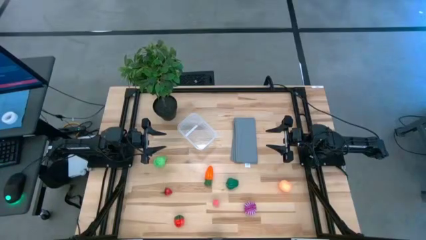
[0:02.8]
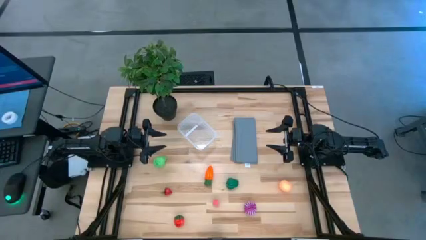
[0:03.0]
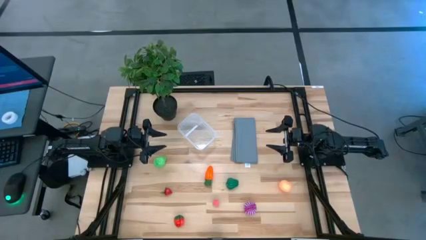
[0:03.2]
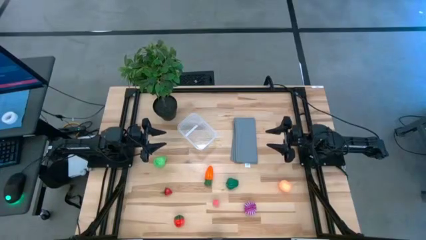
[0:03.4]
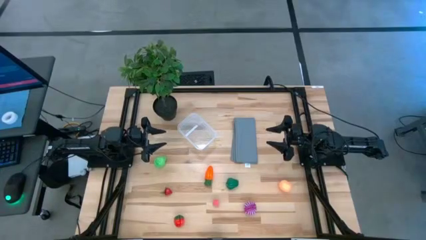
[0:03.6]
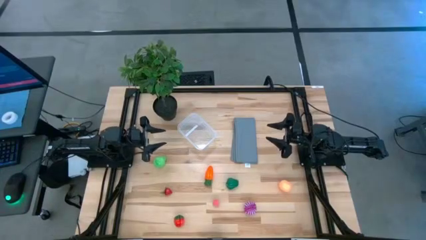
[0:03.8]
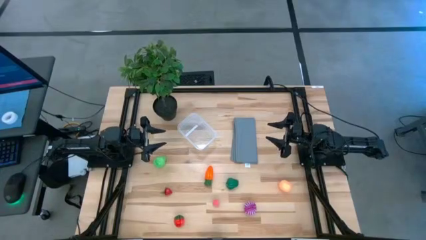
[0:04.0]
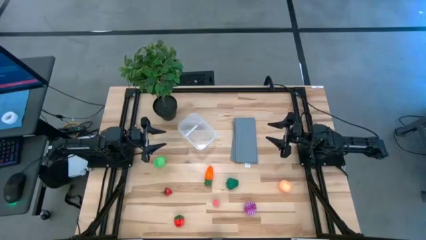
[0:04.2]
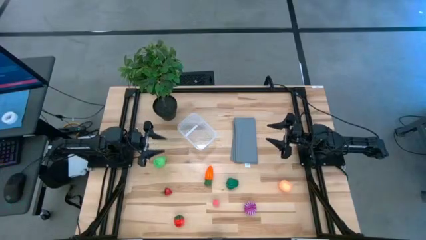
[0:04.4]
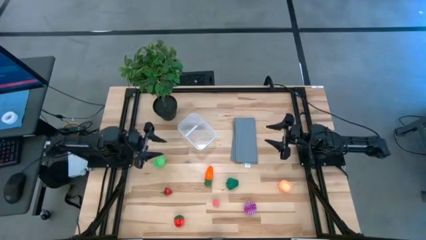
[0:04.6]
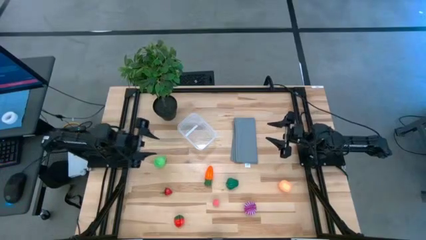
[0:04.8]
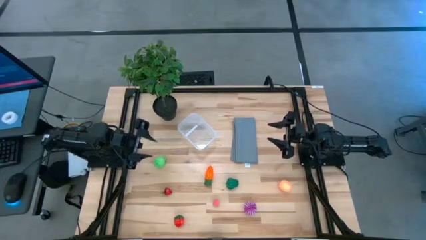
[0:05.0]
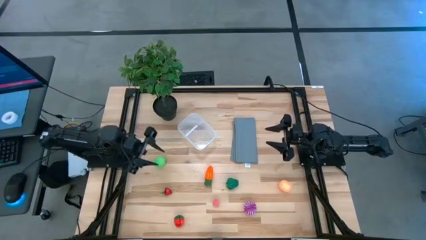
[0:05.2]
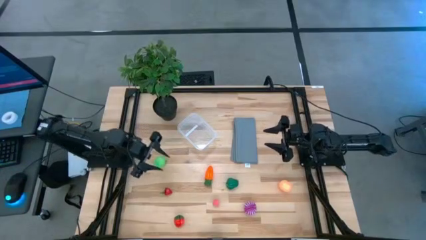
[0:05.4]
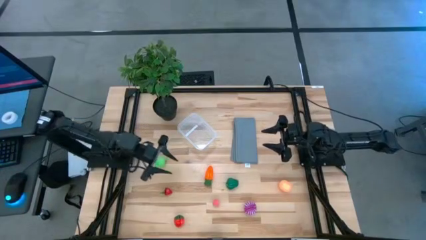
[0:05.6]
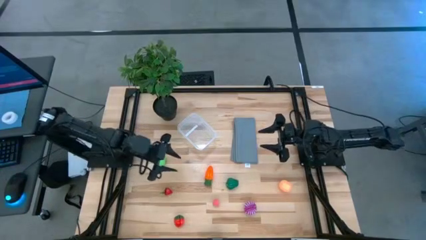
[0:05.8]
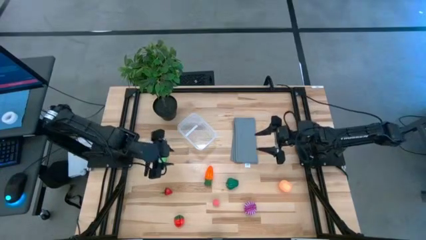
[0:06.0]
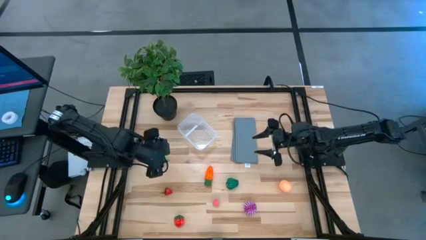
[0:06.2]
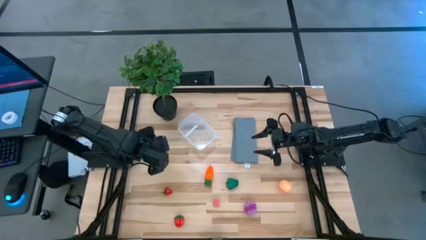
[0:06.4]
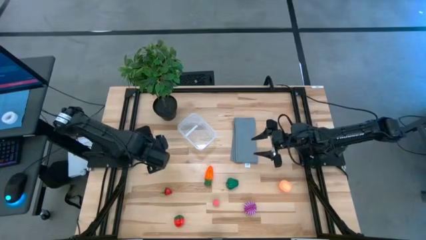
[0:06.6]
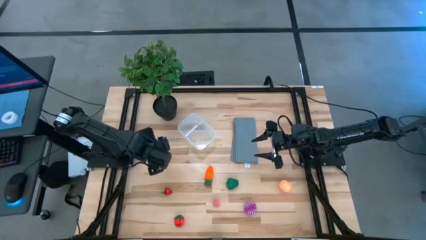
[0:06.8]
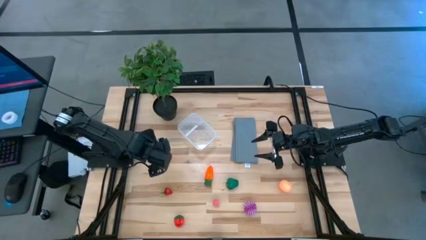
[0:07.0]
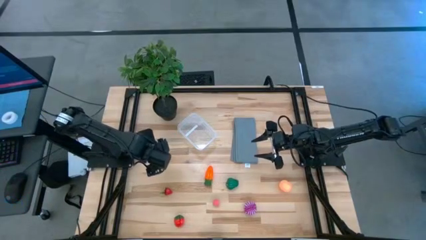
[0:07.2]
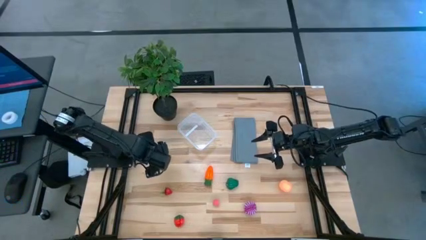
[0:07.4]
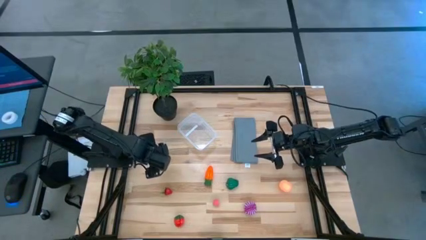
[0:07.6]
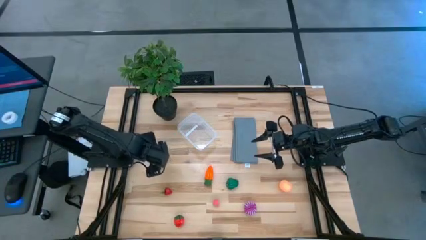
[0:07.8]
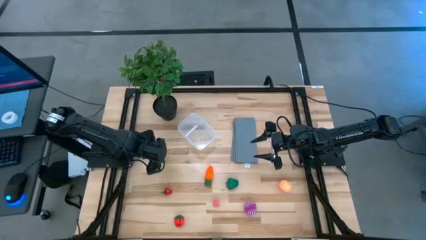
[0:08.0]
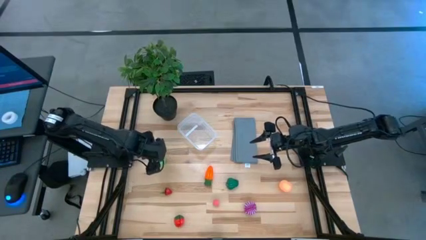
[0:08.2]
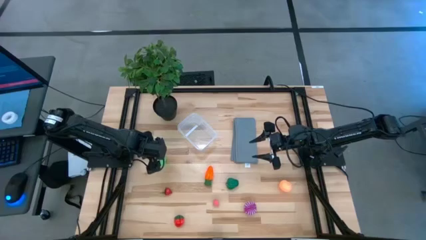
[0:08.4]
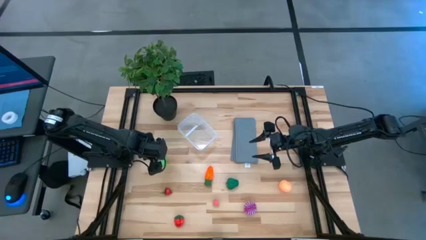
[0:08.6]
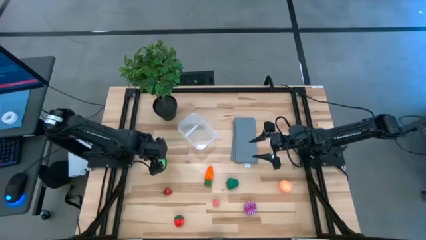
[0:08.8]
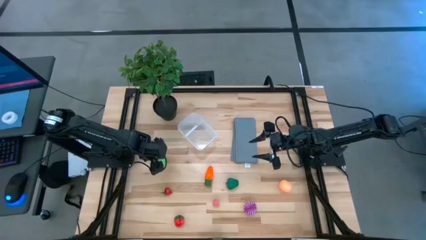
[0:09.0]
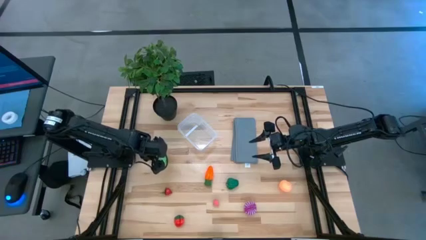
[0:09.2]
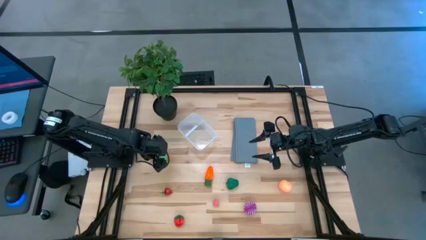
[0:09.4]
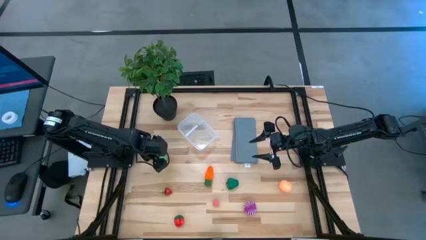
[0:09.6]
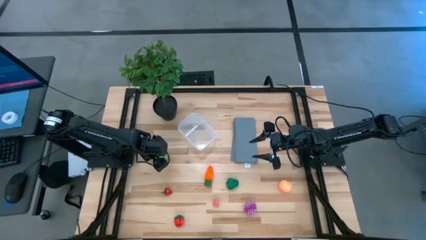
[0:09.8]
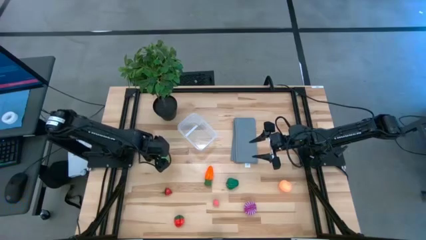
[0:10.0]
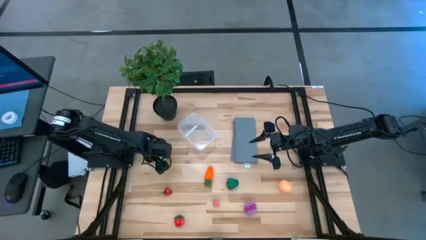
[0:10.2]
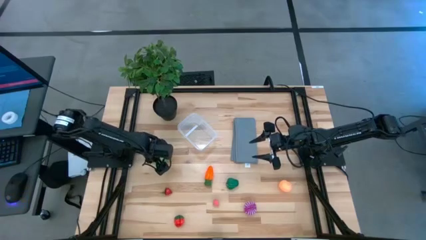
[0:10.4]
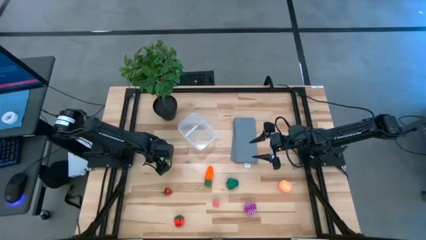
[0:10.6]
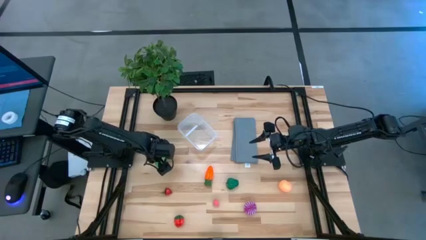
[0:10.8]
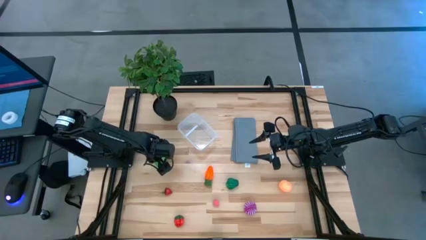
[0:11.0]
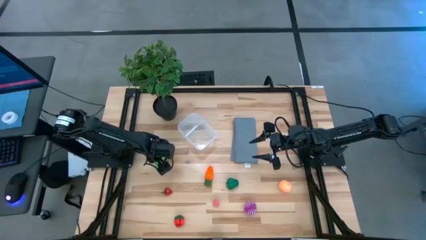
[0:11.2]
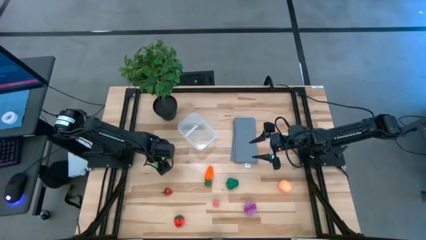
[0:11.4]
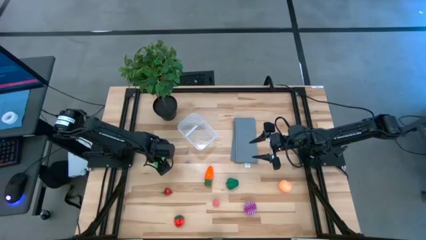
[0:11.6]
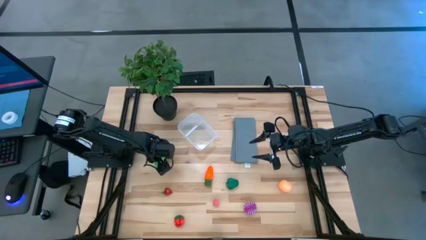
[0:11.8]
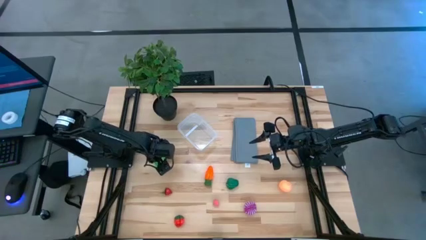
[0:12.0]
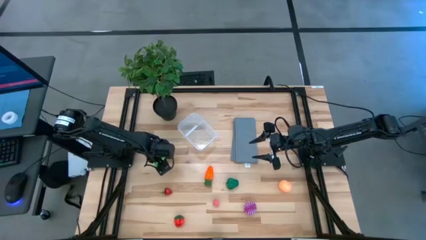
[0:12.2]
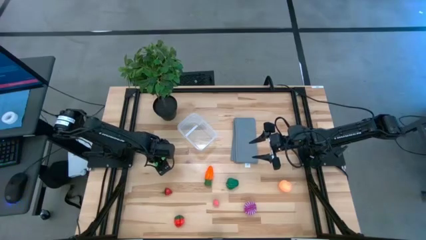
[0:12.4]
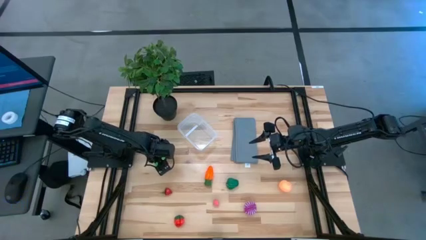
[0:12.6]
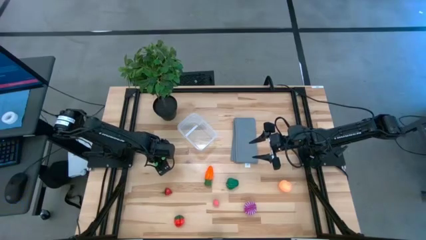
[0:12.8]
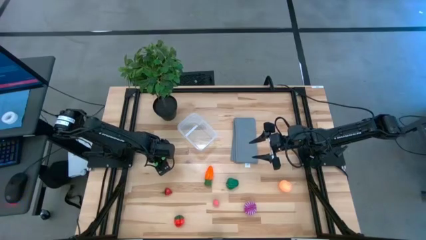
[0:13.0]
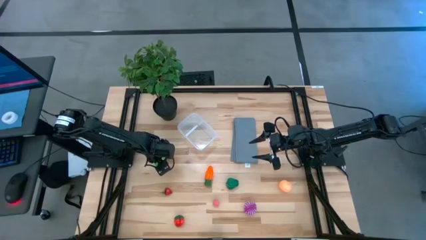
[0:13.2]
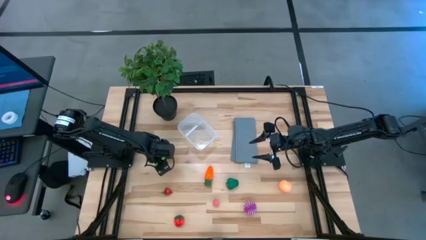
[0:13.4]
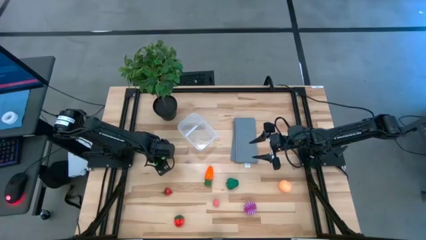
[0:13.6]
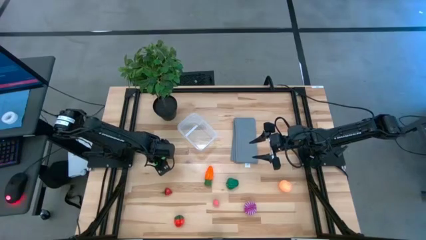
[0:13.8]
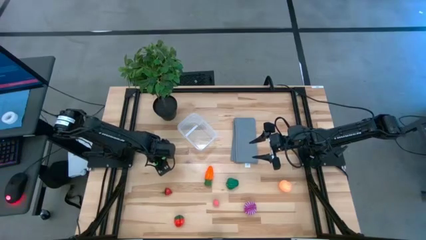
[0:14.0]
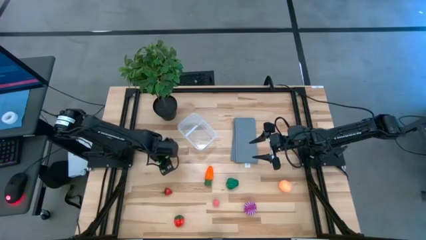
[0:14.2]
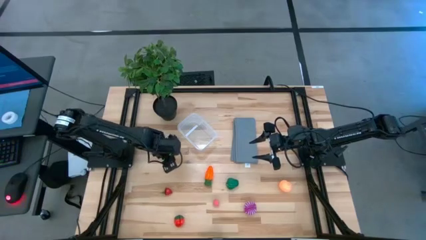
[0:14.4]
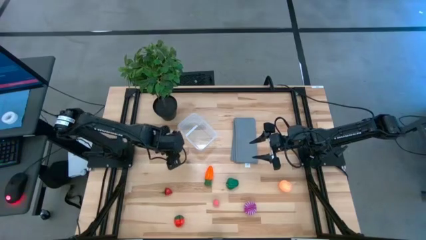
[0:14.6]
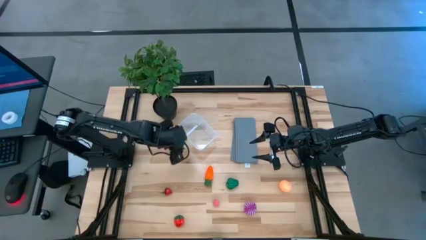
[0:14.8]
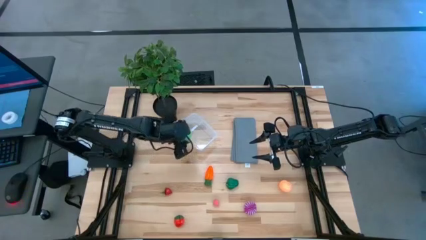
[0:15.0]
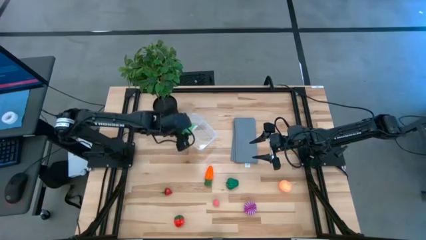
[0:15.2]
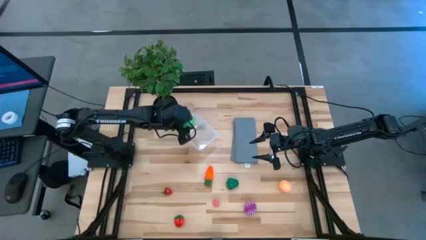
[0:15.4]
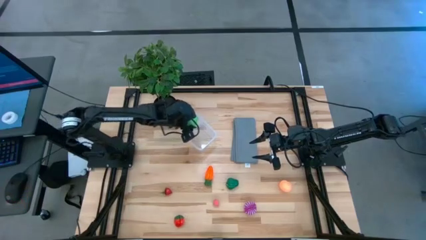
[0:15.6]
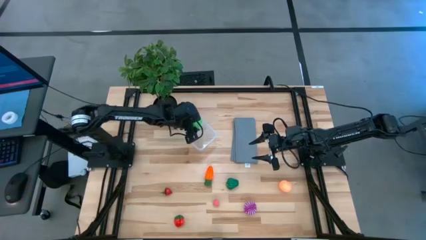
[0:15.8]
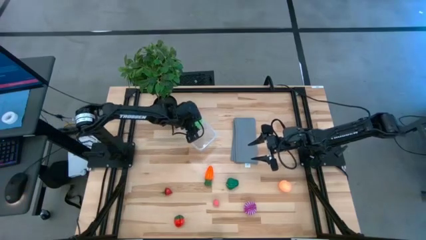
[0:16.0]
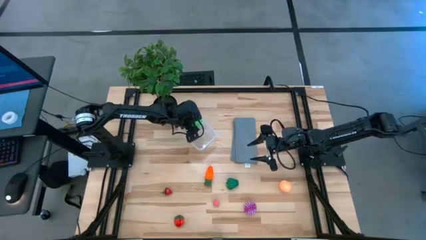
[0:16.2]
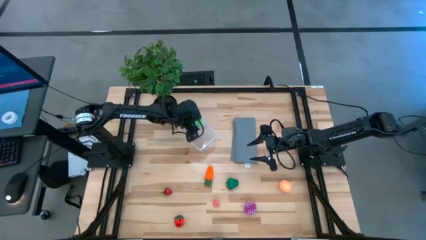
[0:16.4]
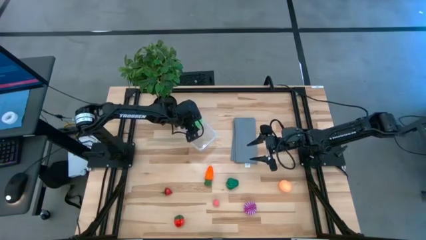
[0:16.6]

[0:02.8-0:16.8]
Task: Pick and placing Produce into tupperware
Put the green pear into the transparent bin
